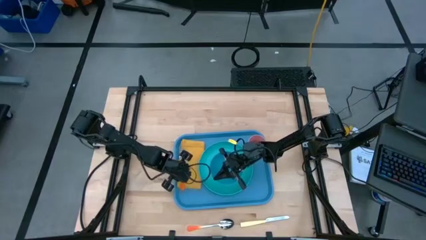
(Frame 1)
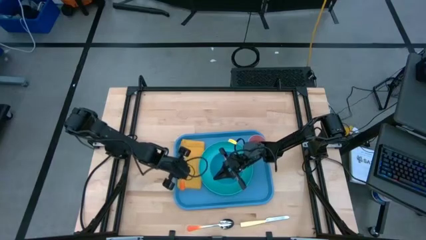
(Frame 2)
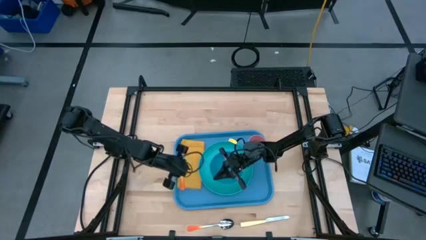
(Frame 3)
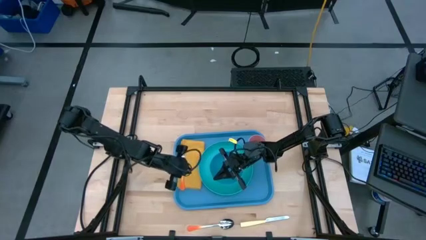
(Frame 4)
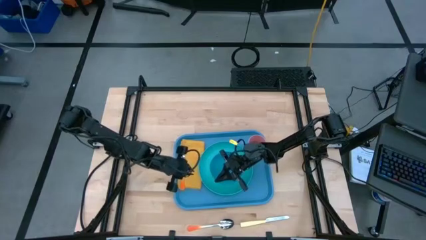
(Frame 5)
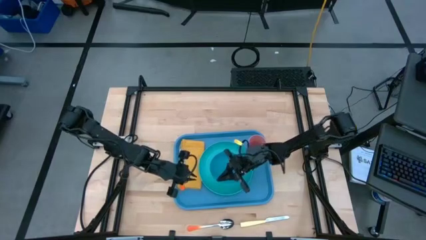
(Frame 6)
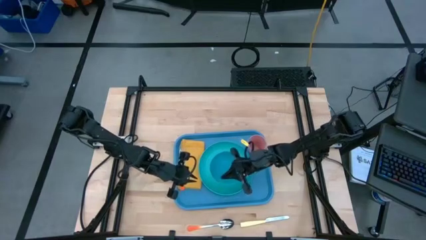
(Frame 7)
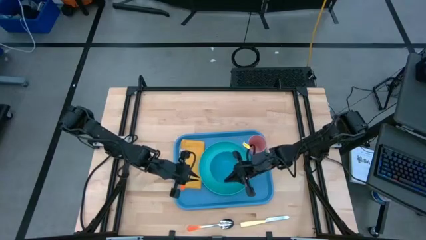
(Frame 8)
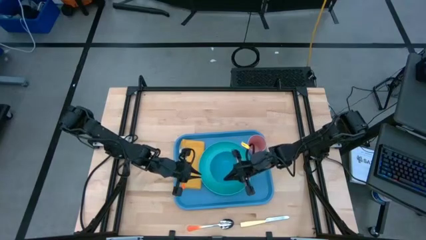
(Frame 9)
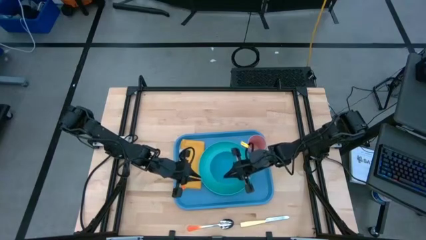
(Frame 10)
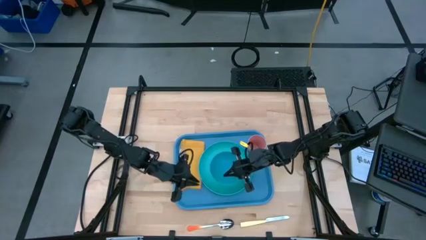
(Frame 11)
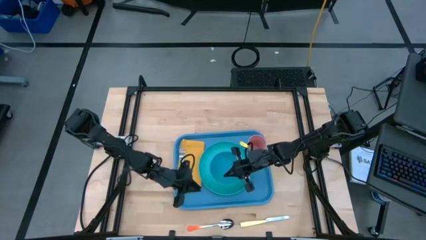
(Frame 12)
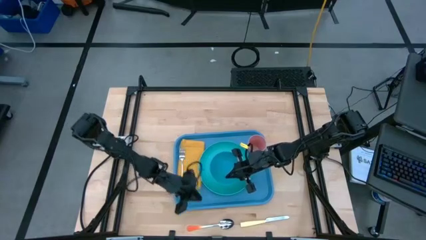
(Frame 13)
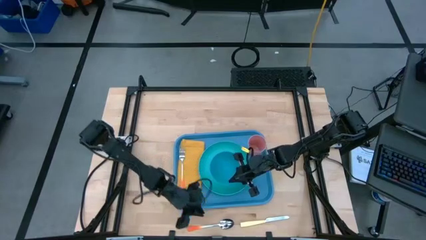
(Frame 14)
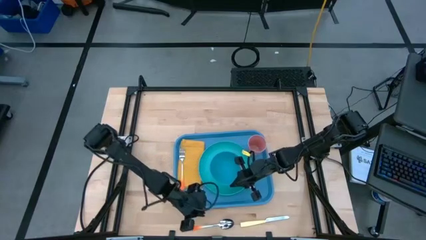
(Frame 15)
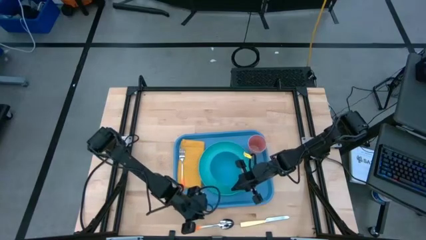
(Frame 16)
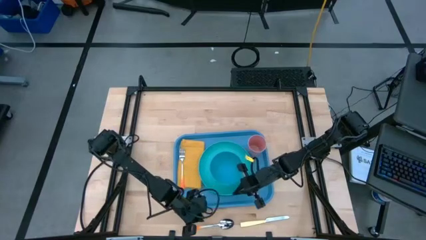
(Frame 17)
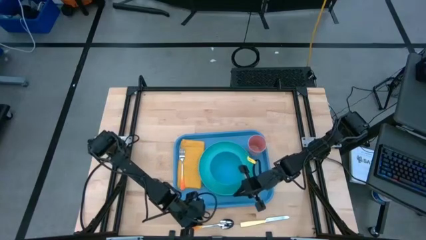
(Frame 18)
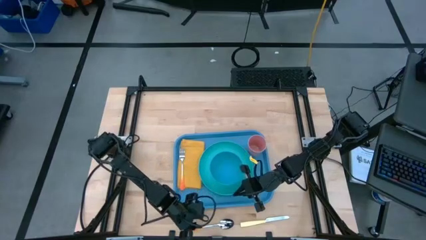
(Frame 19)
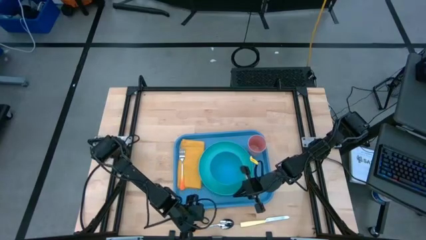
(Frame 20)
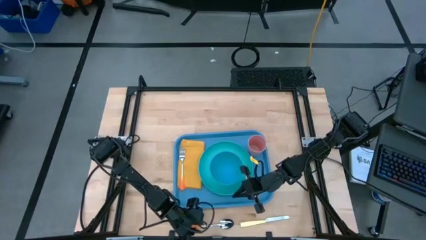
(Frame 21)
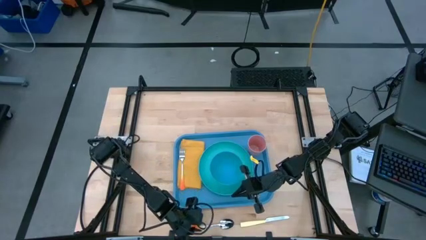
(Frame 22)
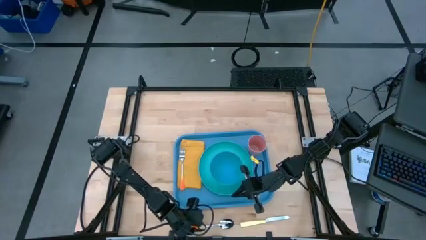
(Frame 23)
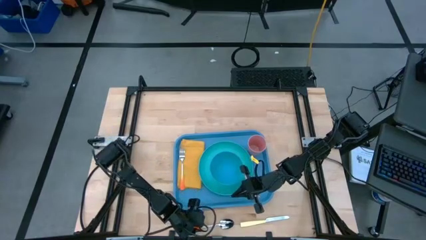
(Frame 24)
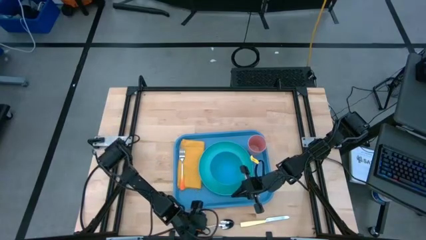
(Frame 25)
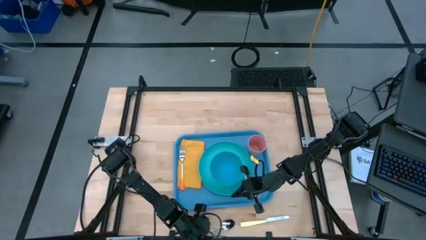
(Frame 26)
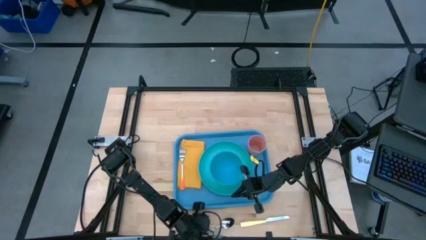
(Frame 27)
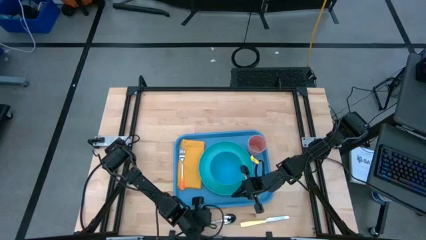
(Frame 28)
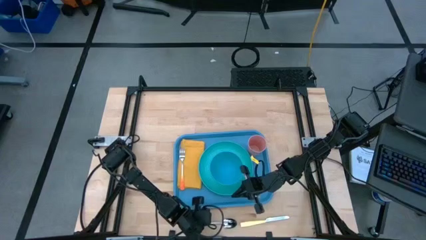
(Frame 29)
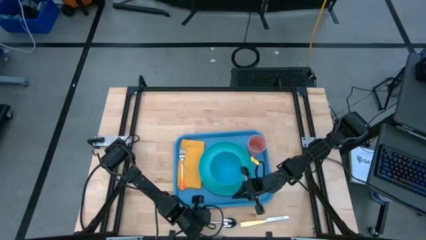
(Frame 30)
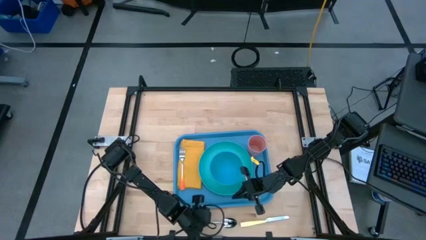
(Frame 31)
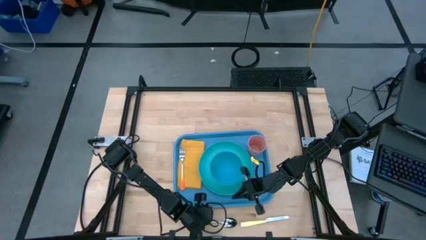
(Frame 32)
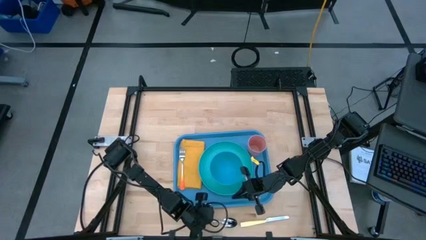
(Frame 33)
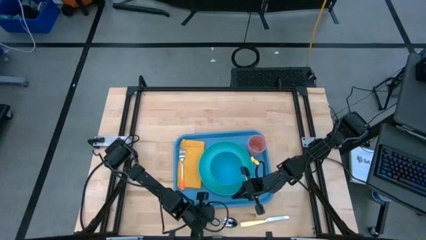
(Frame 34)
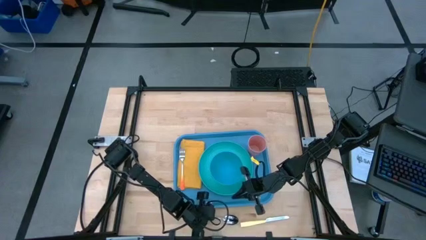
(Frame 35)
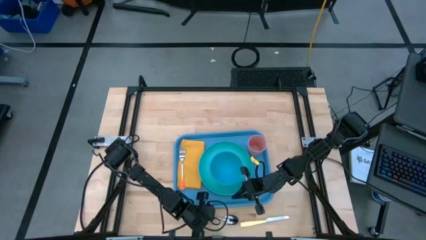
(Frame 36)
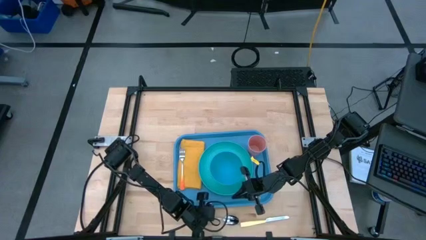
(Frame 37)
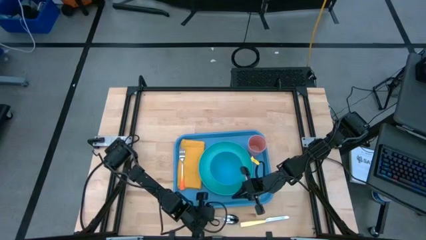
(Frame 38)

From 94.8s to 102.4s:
Task: Set up tray
Put the orange spoon to the right of the orange fork on the yellow napkin

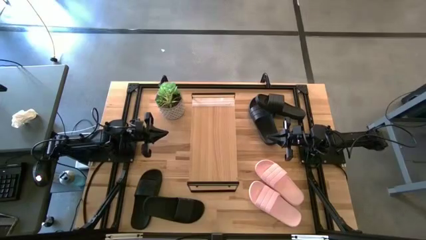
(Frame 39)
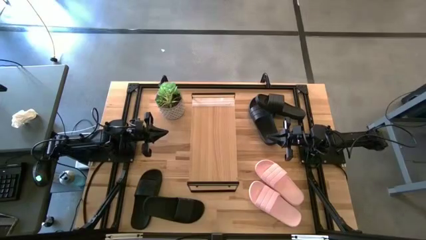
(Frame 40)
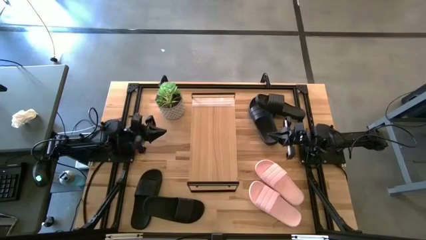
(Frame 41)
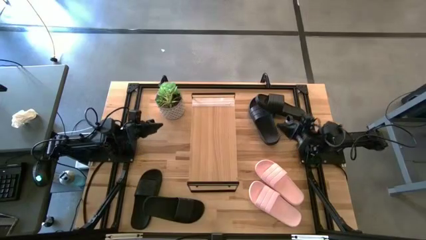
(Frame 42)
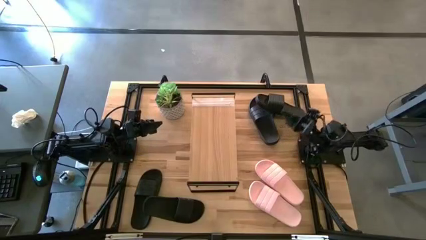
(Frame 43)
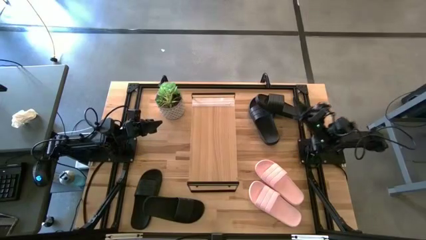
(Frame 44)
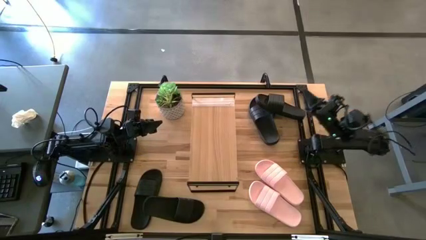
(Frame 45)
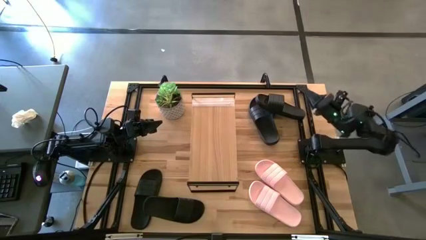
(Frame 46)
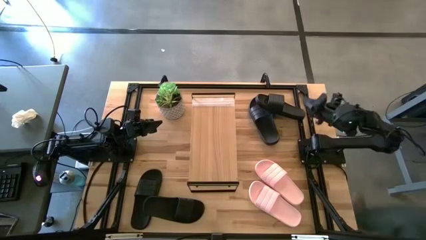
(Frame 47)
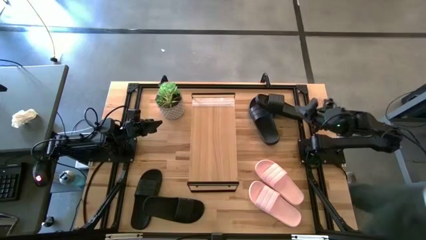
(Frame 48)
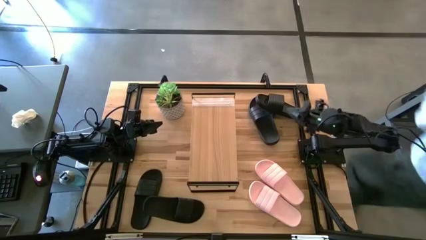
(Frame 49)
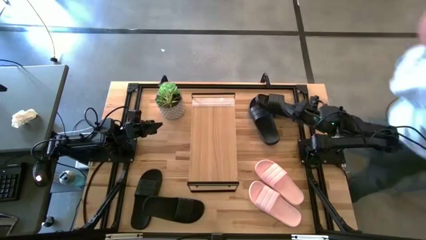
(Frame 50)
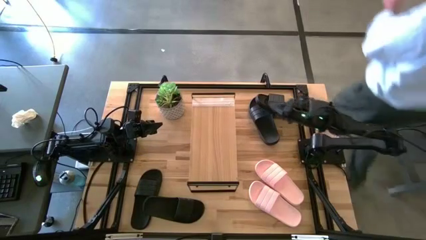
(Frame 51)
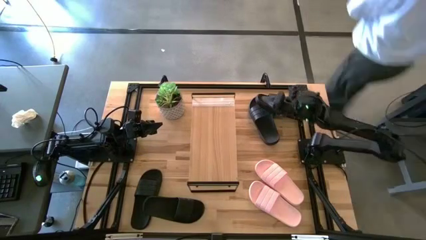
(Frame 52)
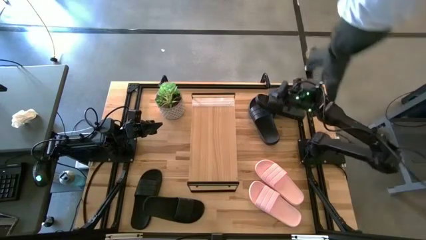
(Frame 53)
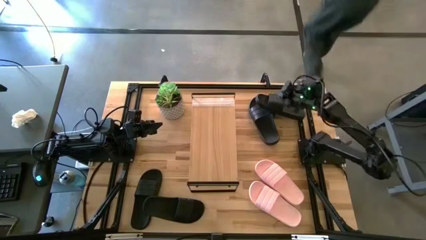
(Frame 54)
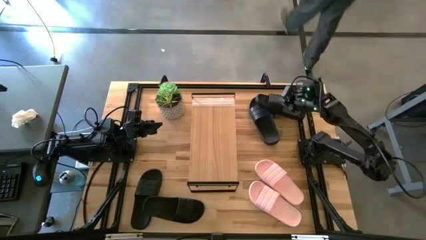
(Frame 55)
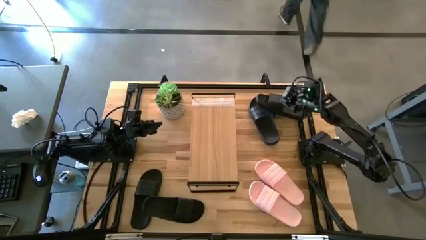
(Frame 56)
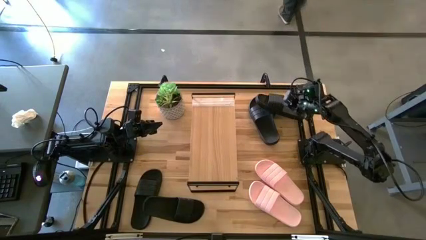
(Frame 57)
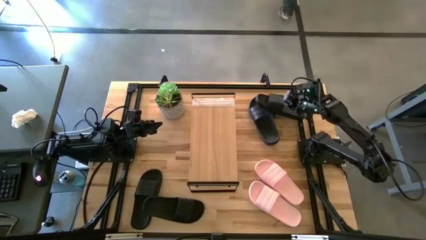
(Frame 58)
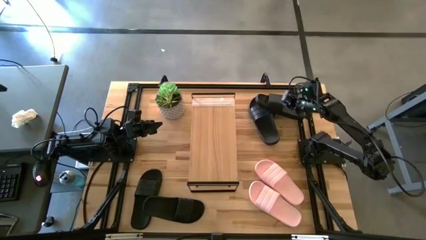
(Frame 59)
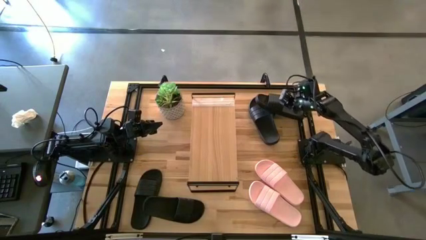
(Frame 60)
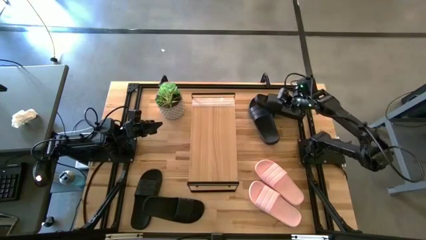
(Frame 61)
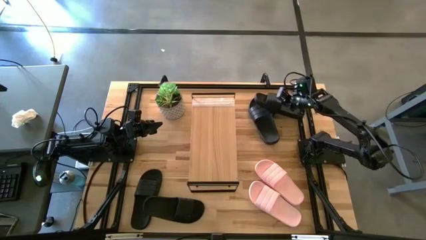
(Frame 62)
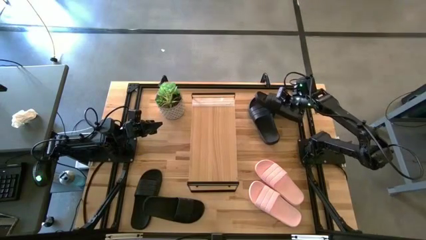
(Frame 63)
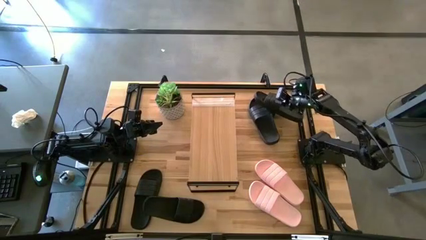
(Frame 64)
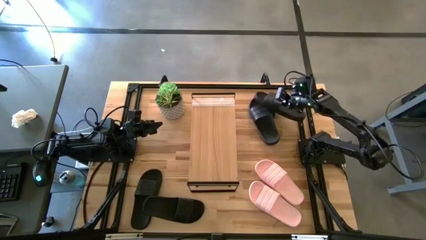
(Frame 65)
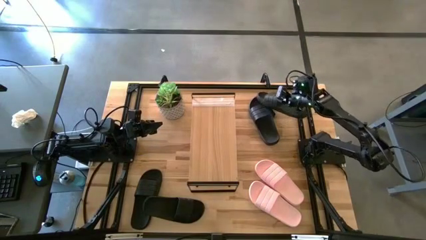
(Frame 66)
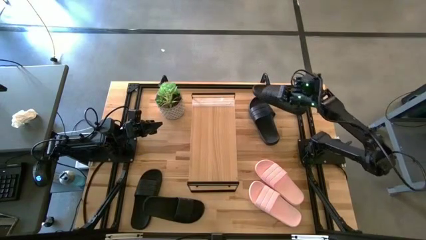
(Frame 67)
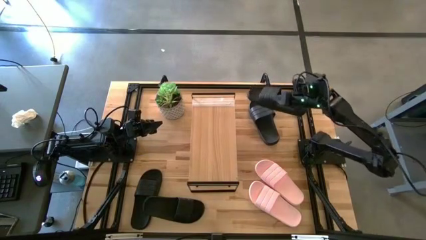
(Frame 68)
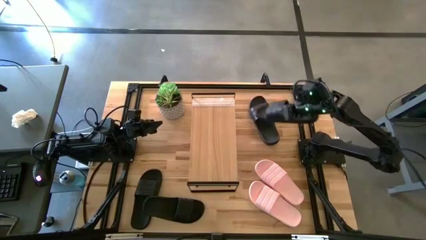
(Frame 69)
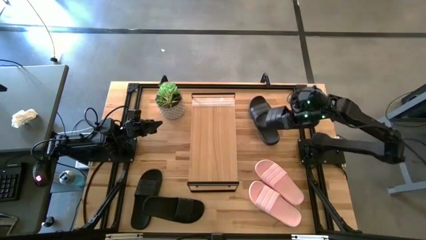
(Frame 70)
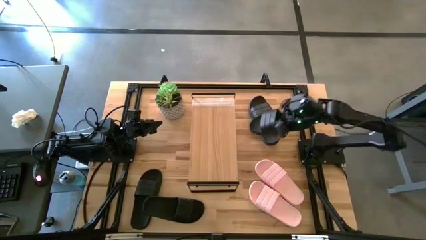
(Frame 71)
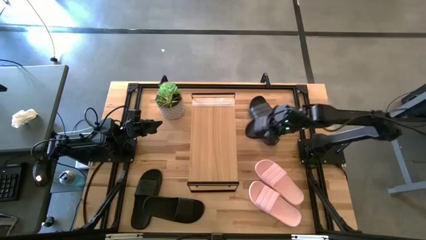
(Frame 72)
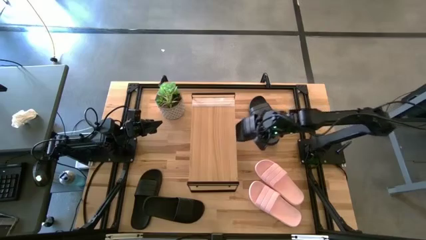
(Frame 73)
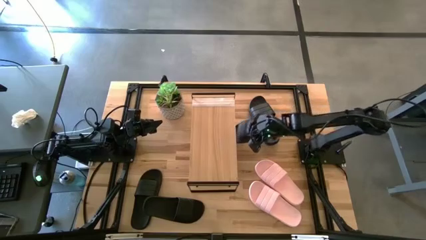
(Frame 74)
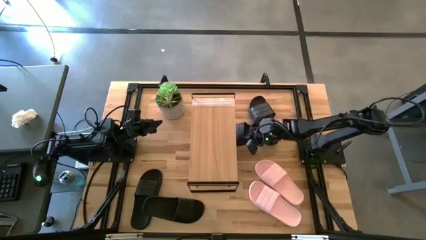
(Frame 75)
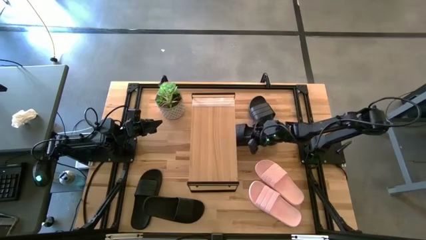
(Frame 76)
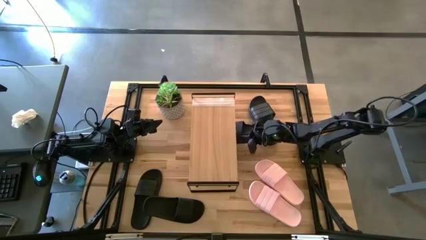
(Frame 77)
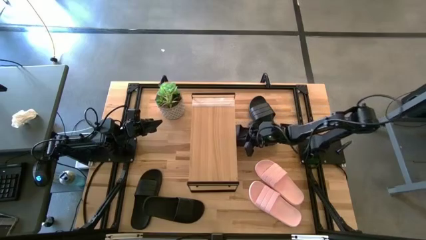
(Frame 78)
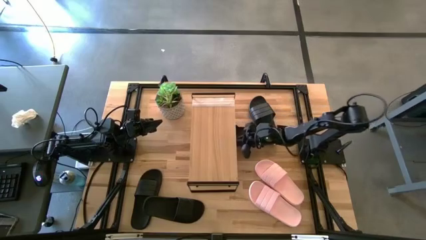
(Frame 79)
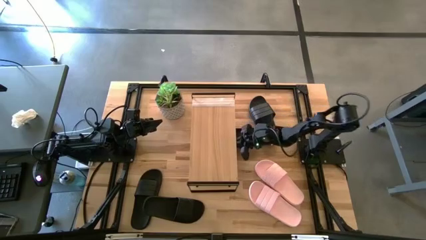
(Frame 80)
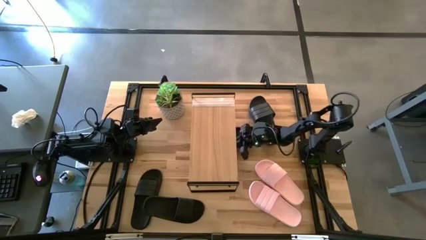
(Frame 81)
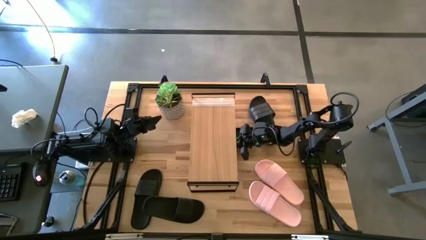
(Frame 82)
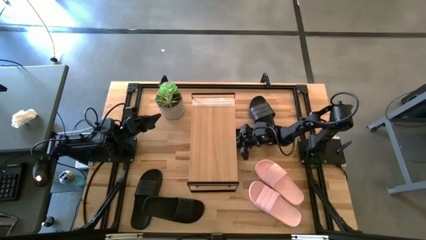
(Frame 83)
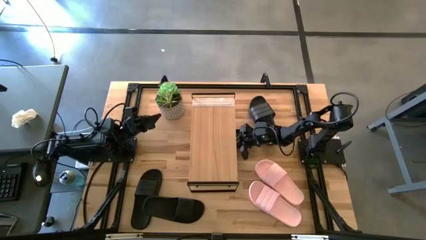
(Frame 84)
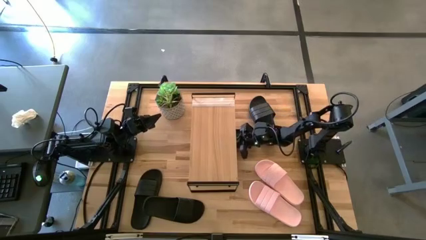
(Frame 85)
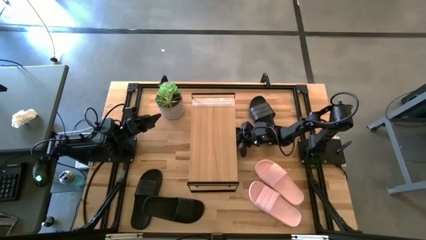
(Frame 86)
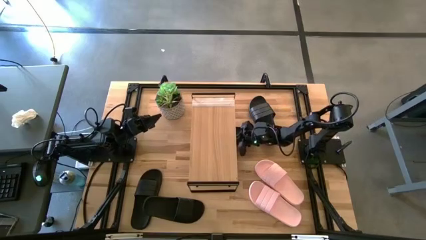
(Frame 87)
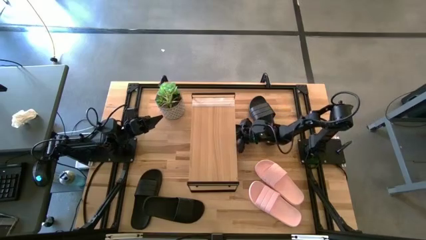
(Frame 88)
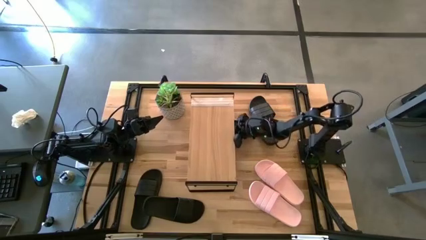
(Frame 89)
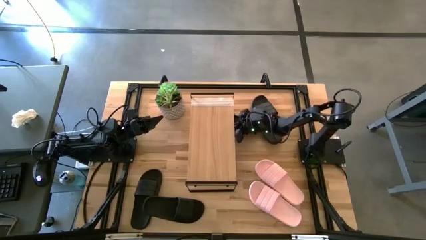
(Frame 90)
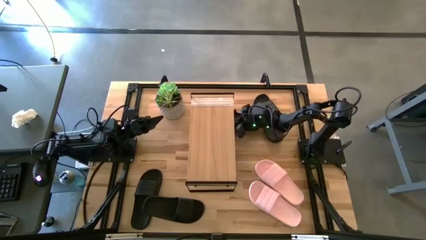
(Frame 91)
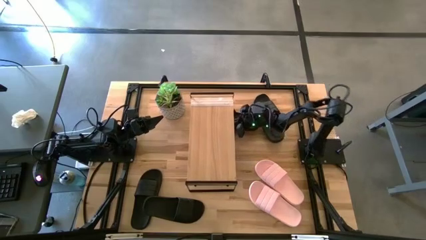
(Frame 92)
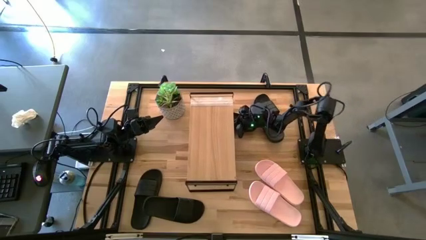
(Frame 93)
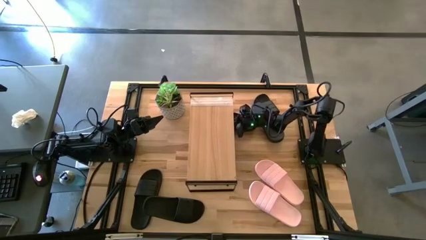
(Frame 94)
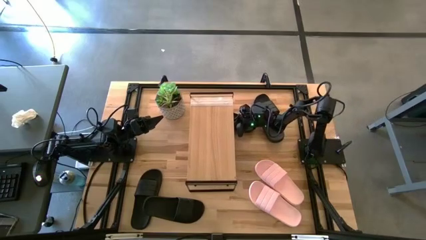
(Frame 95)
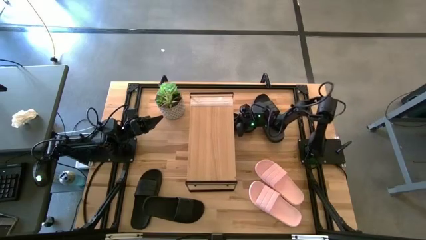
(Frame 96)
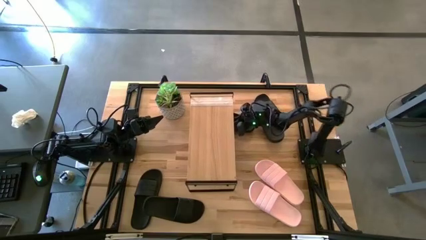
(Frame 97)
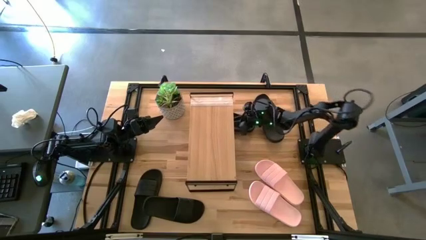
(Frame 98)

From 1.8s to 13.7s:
Task: Pick and place slides into the shelf
Move the top right black slide under the shelf
